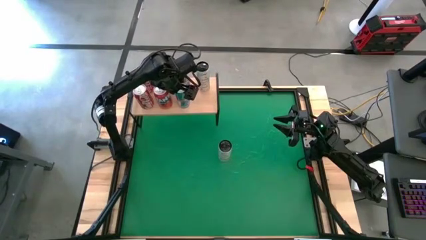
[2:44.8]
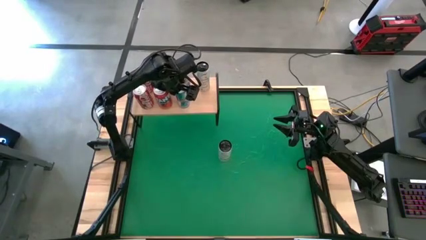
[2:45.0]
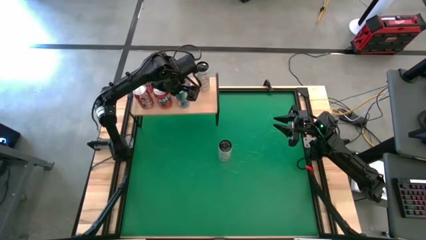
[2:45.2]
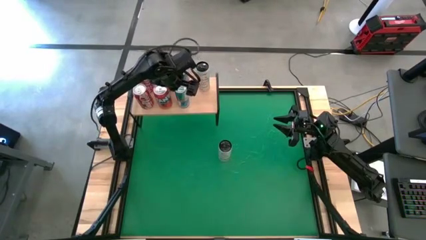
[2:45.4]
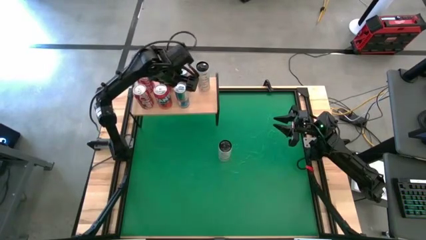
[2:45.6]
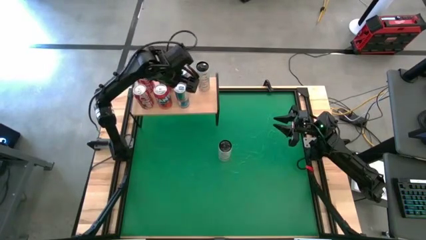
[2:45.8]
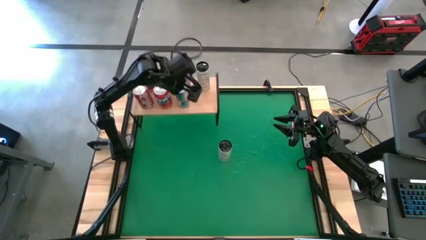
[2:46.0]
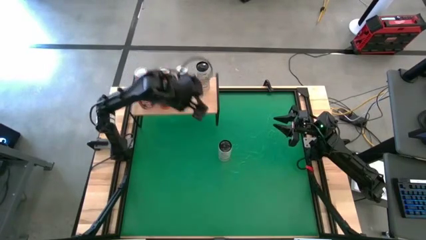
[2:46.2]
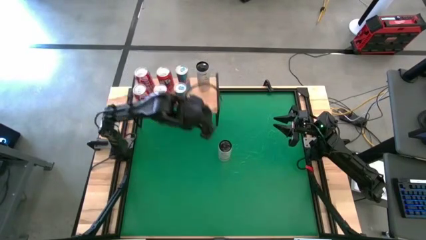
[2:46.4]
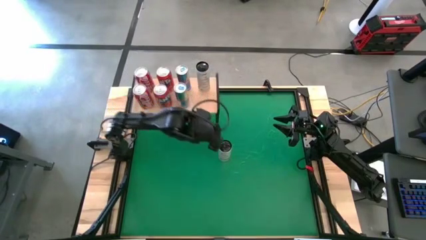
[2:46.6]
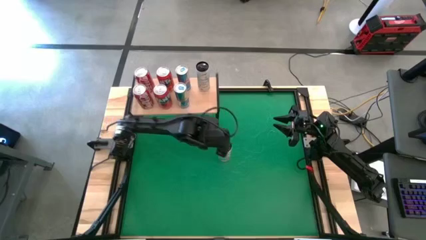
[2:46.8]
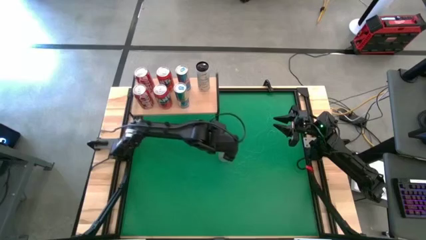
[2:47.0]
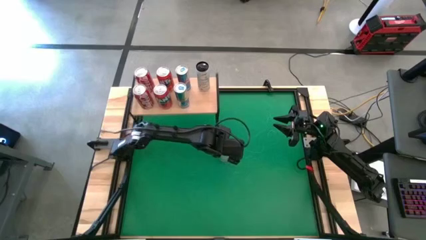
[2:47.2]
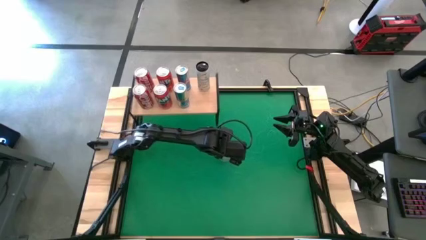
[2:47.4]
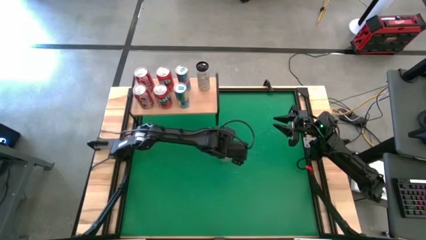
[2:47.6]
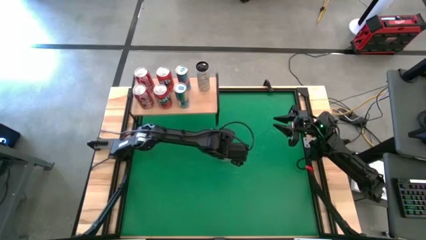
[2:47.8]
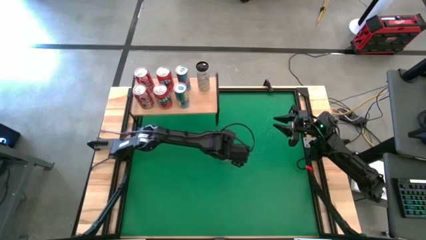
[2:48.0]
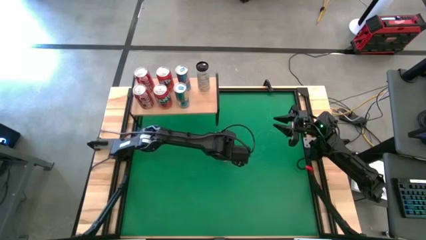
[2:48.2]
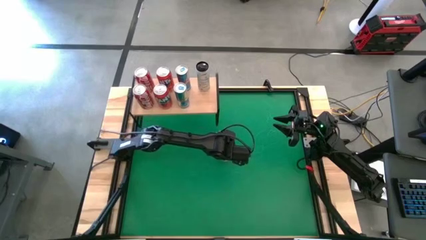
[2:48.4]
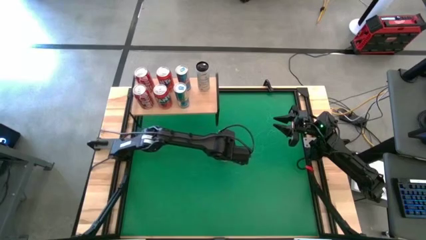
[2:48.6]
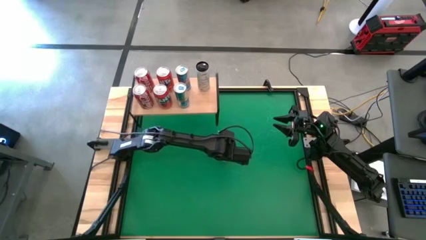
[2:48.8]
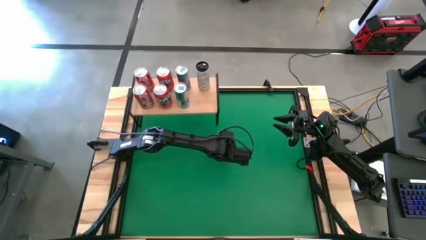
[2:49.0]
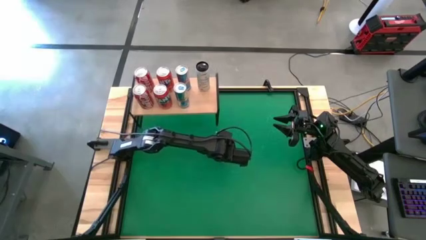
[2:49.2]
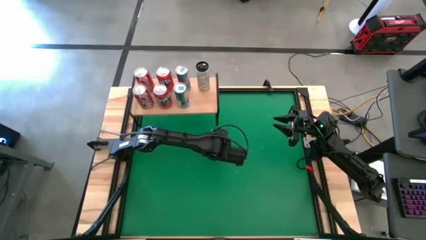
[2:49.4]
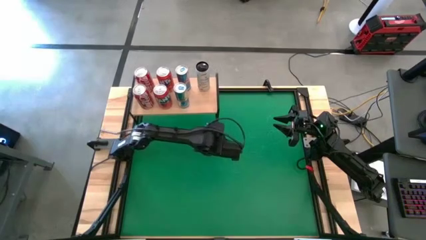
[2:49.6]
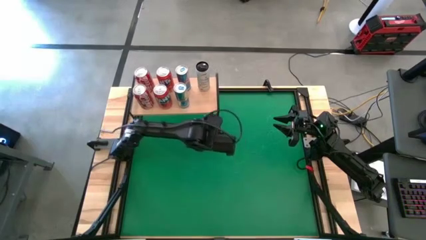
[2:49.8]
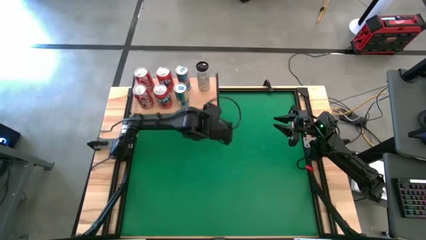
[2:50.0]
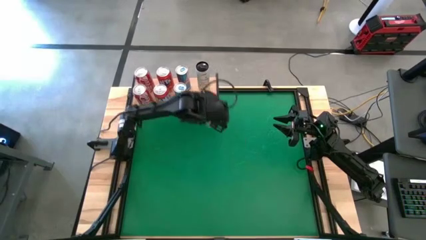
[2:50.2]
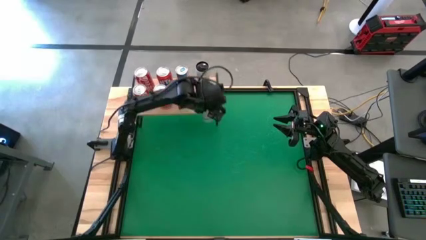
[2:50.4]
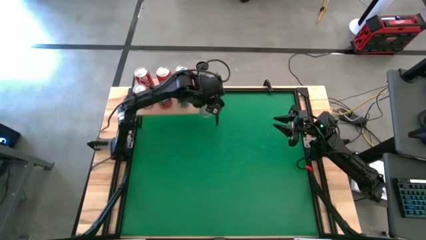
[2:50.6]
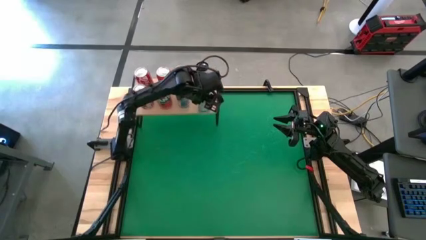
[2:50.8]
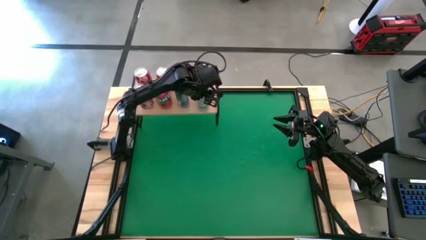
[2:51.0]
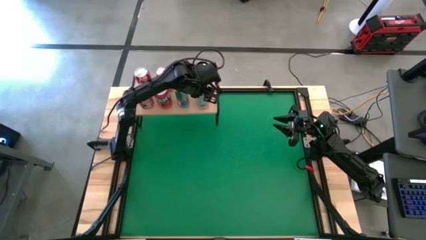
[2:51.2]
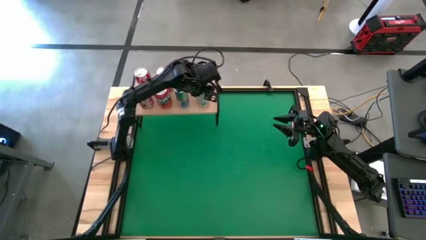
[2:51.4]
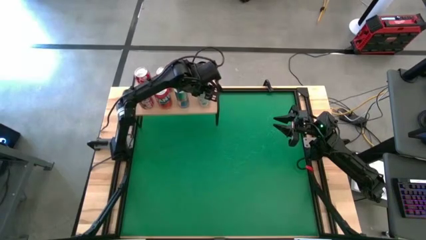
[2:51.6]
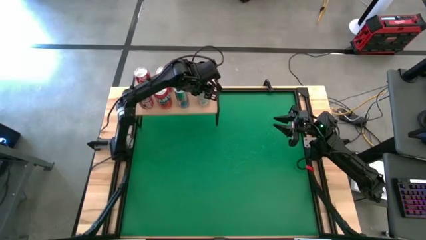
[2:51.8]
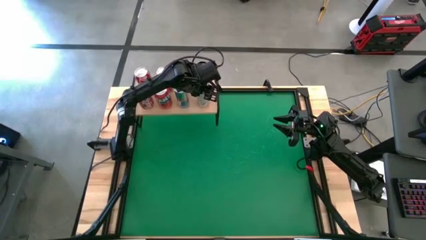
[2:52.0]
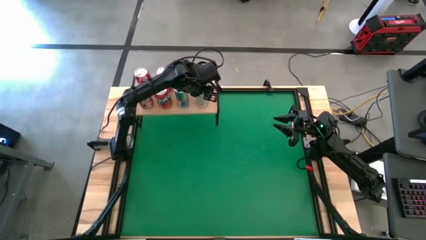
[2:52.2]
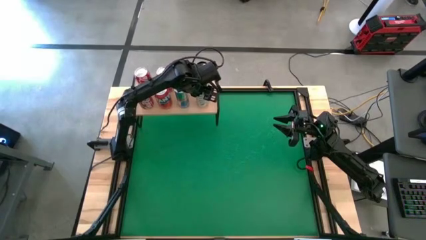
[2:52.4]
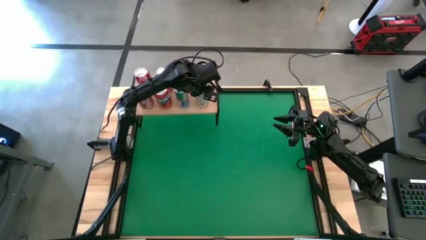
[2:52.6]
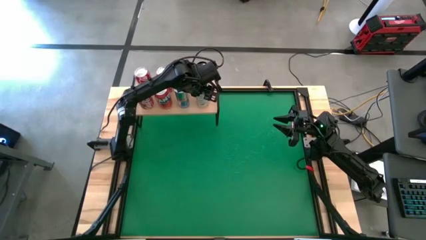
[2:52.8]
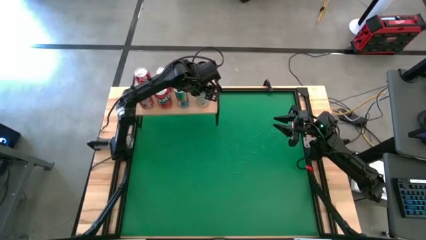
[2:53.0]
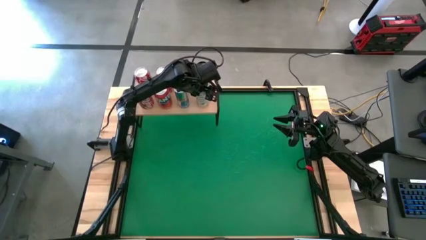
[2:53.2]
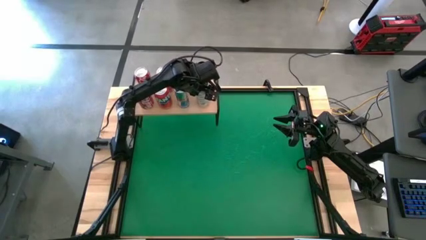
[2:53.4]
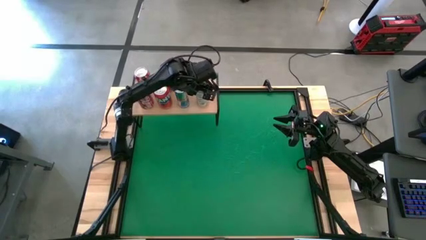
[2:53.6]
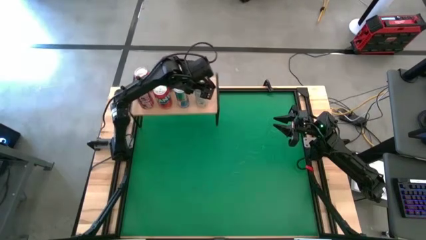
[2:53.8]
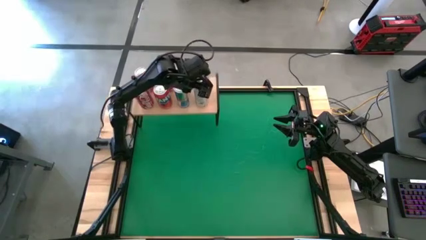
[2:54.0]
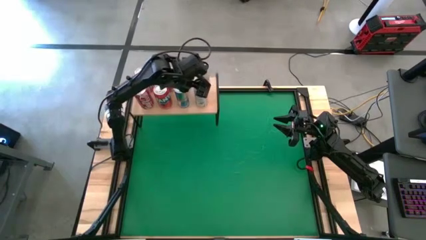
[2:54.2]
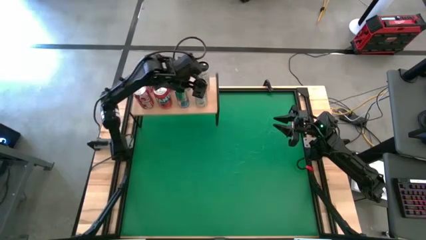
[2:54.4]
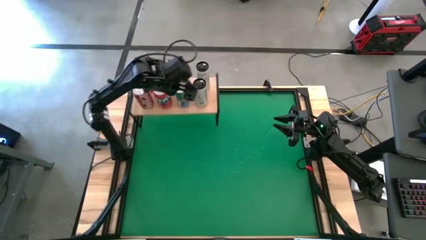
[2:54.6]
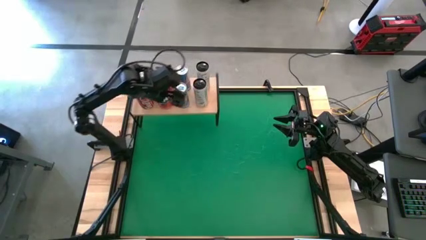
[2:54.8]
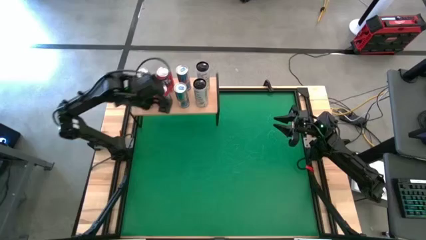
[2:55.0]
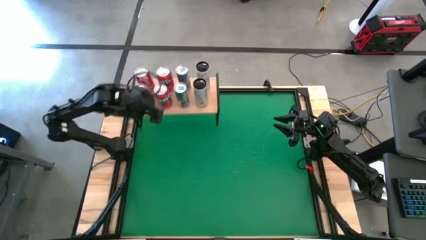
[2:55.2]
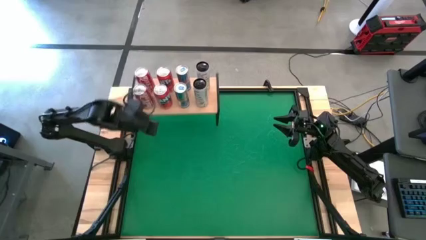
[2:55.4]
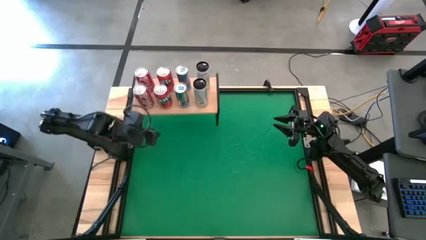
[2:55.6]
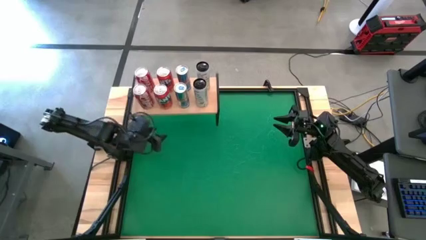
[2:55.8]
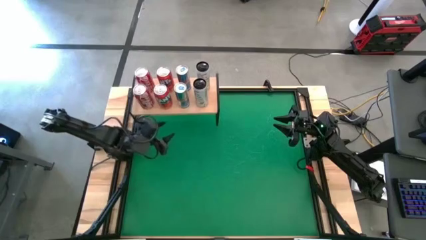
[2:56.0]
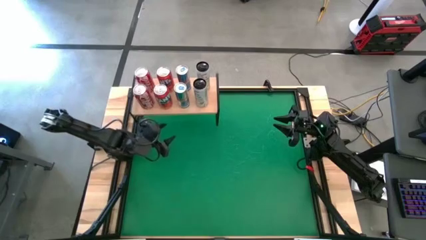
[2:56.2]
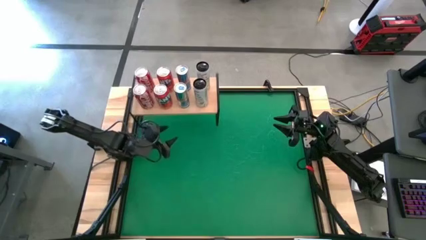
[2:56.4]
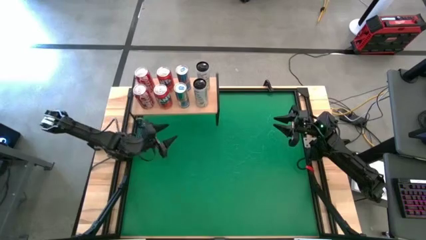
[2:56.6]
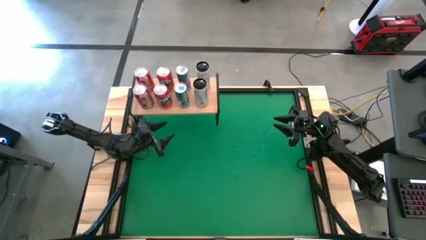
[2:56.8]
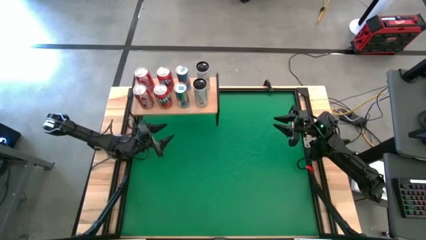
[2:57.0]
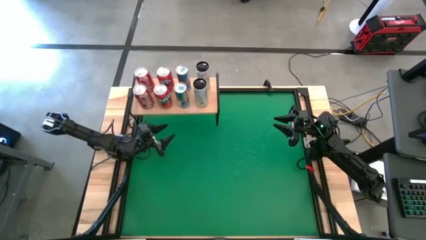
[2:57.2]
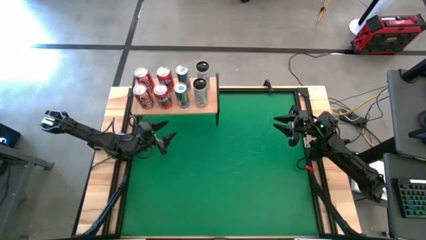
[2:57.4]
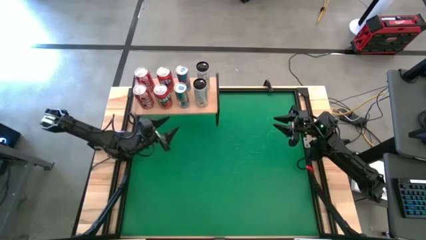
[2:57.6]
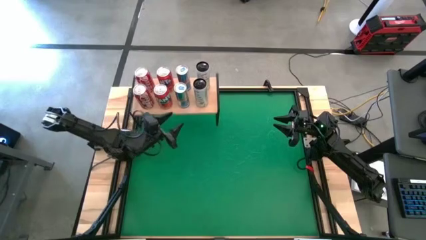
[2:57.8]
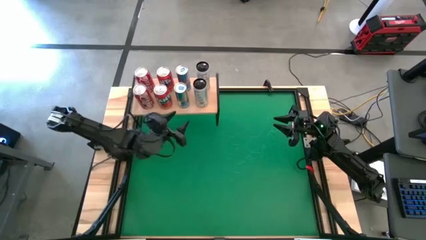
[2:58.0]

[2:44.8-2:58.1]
Task: Place canned beverage on shelf
Put the white soda aligned with the other white soda can can on the shelf
